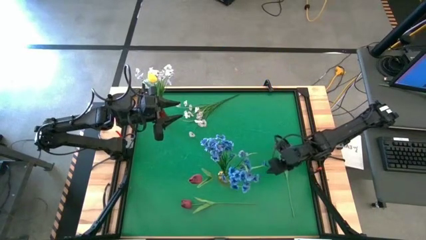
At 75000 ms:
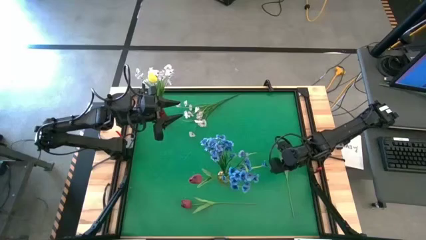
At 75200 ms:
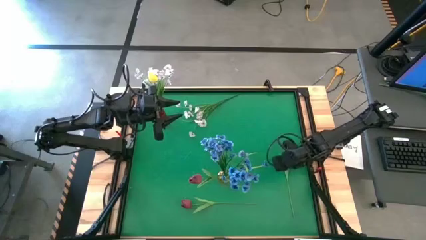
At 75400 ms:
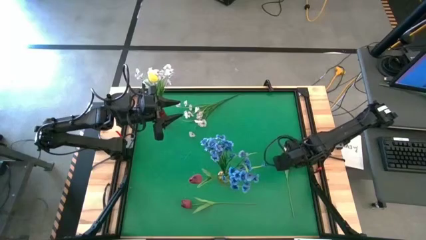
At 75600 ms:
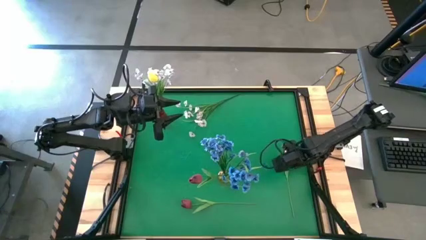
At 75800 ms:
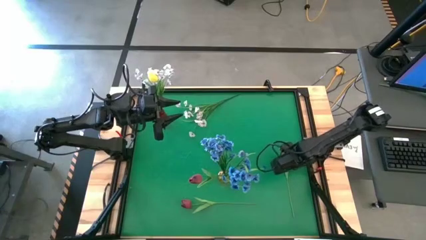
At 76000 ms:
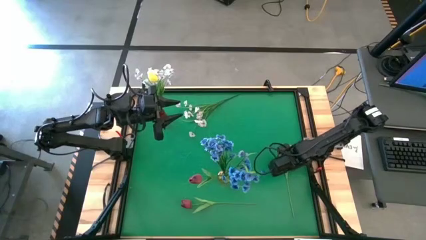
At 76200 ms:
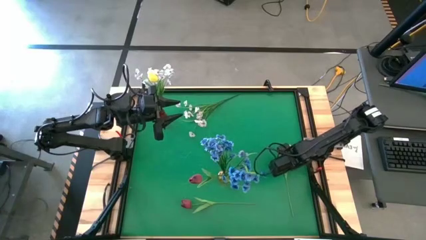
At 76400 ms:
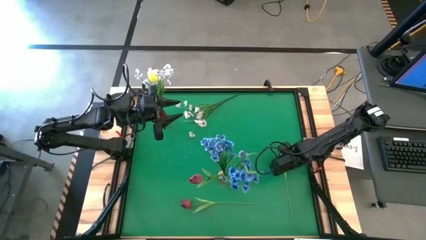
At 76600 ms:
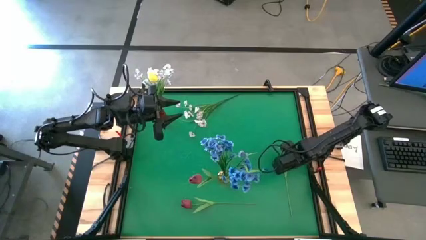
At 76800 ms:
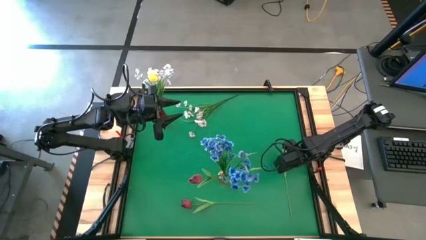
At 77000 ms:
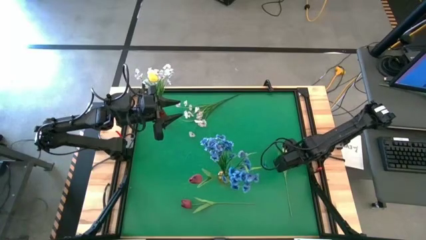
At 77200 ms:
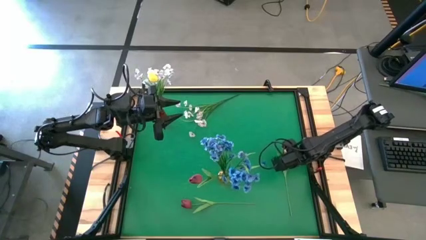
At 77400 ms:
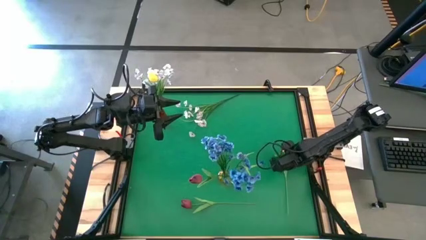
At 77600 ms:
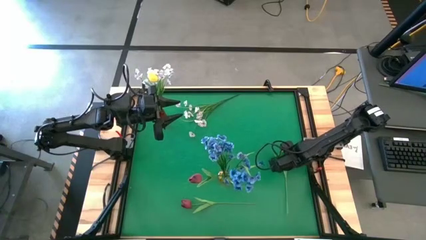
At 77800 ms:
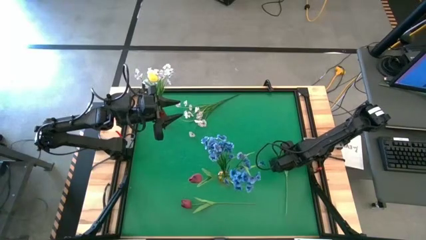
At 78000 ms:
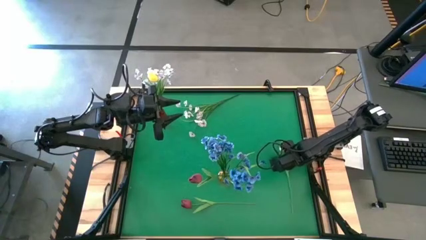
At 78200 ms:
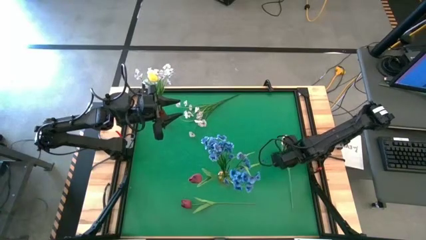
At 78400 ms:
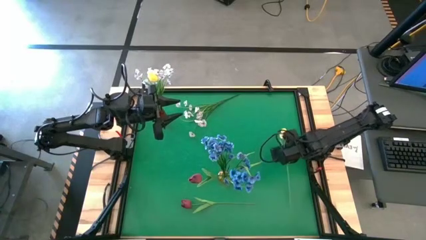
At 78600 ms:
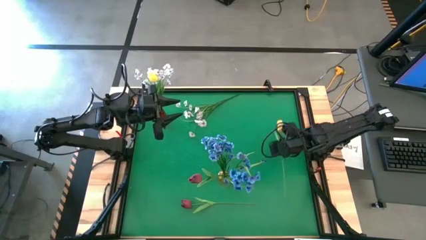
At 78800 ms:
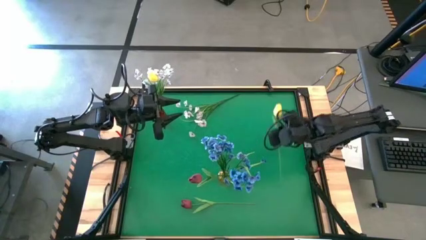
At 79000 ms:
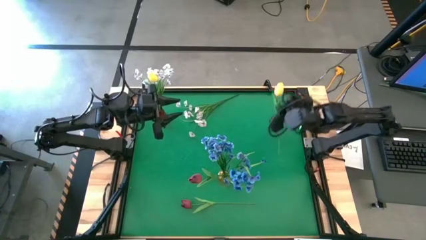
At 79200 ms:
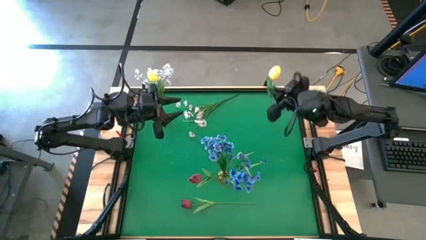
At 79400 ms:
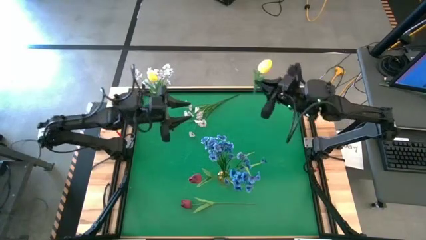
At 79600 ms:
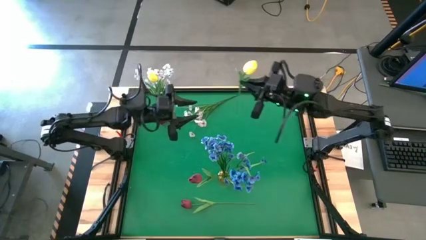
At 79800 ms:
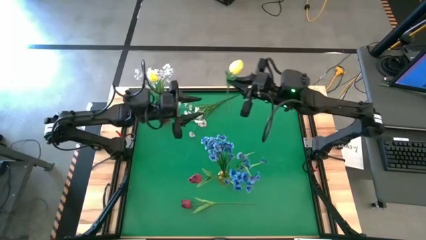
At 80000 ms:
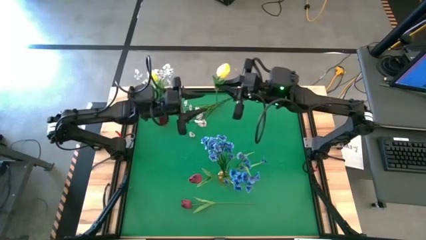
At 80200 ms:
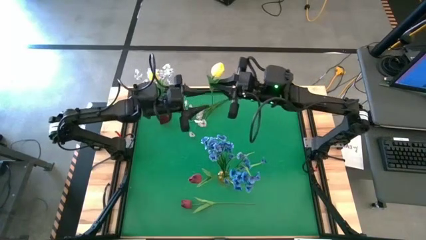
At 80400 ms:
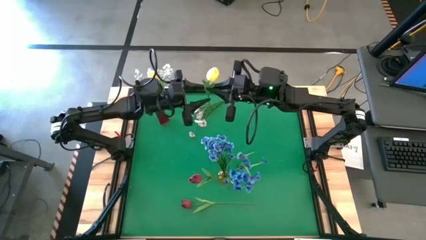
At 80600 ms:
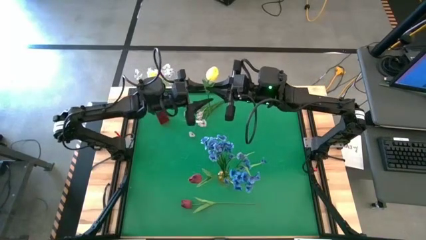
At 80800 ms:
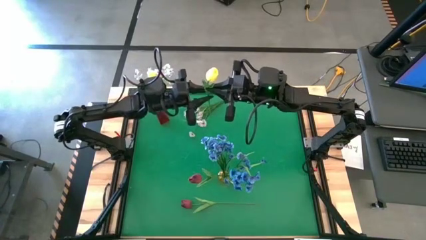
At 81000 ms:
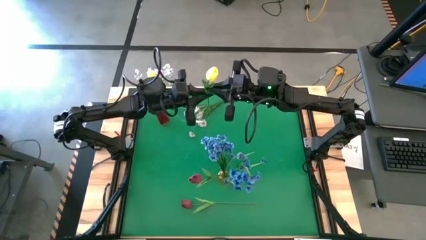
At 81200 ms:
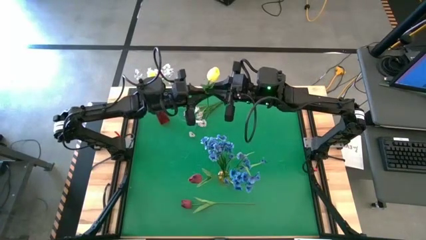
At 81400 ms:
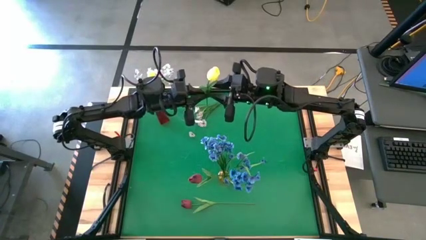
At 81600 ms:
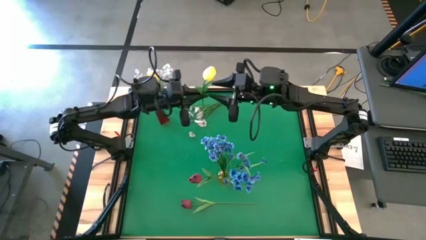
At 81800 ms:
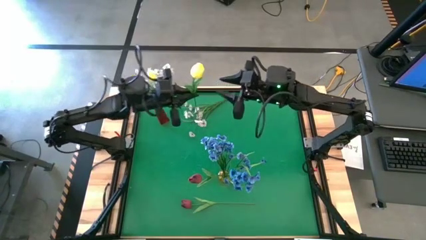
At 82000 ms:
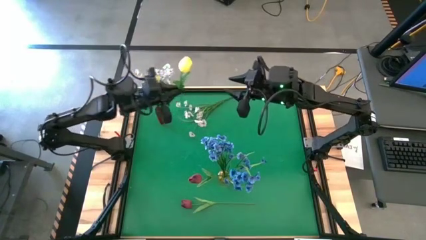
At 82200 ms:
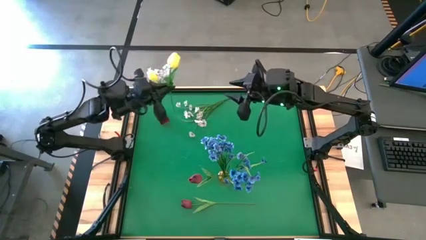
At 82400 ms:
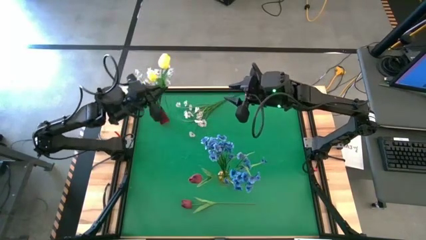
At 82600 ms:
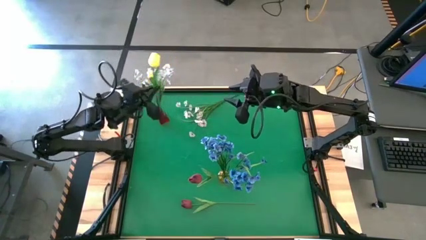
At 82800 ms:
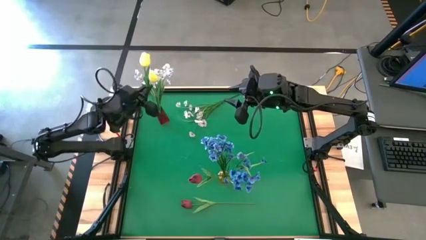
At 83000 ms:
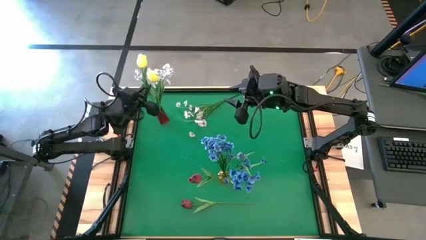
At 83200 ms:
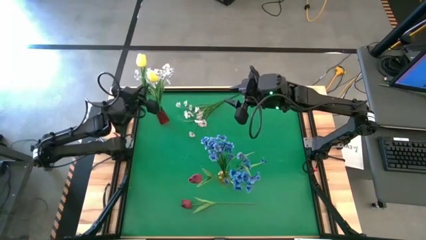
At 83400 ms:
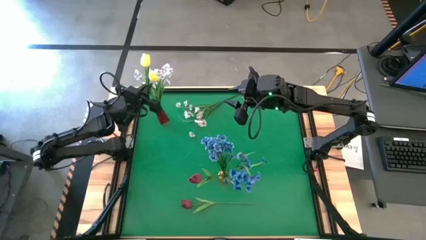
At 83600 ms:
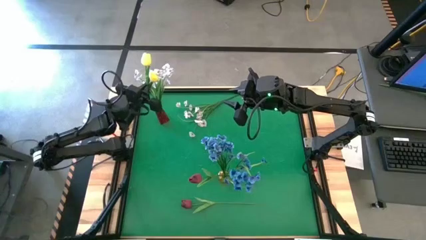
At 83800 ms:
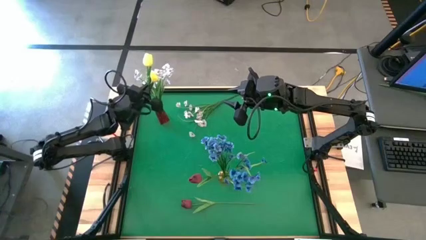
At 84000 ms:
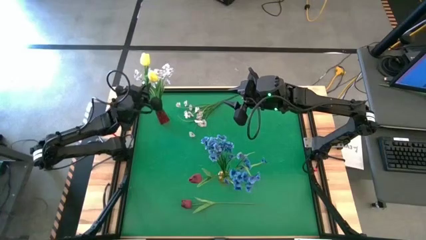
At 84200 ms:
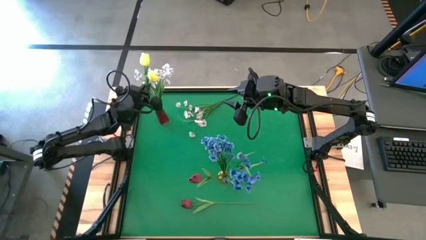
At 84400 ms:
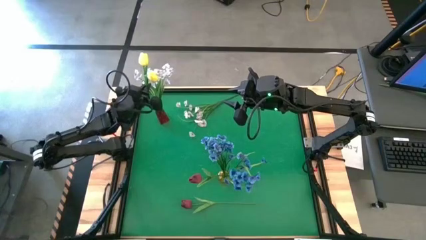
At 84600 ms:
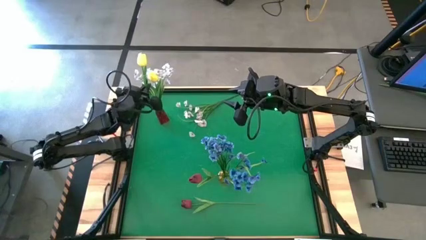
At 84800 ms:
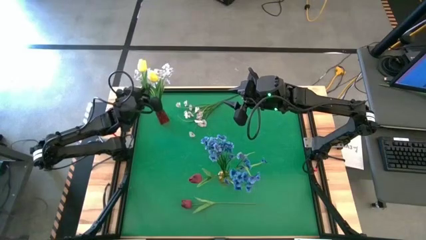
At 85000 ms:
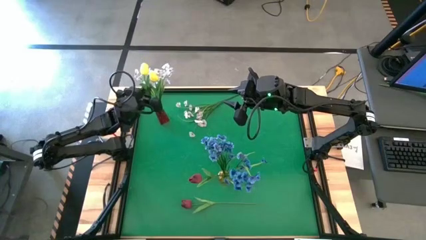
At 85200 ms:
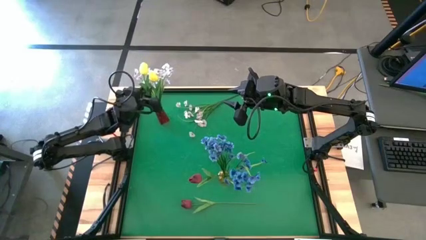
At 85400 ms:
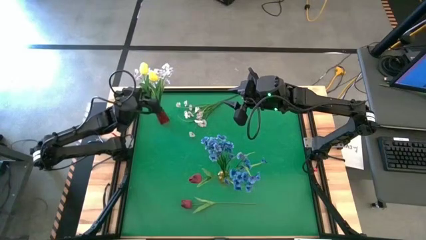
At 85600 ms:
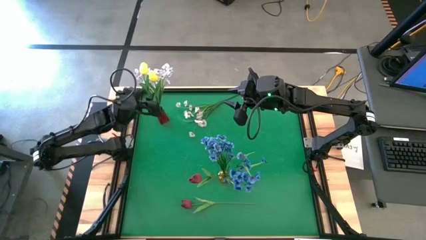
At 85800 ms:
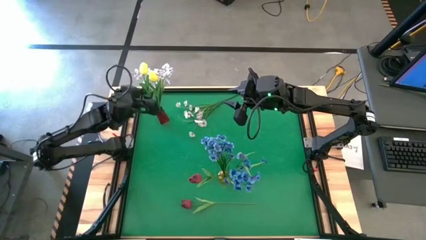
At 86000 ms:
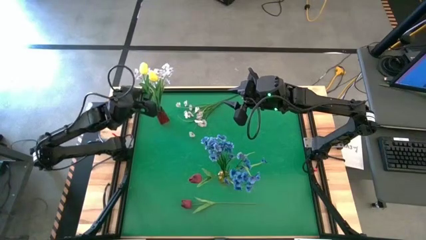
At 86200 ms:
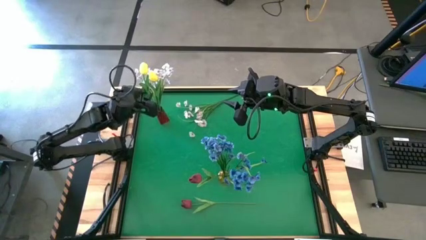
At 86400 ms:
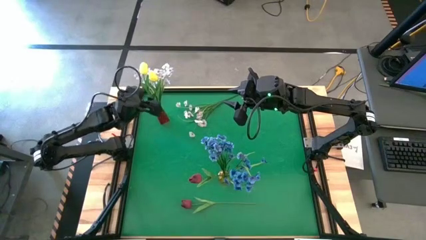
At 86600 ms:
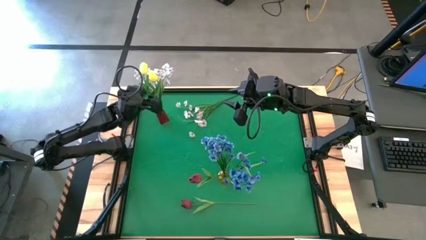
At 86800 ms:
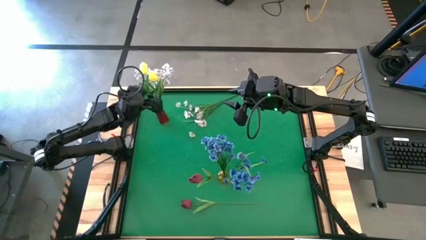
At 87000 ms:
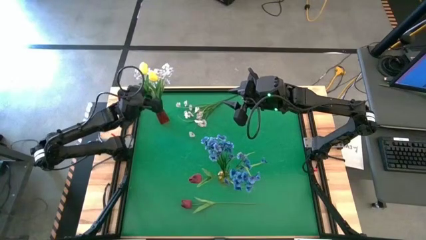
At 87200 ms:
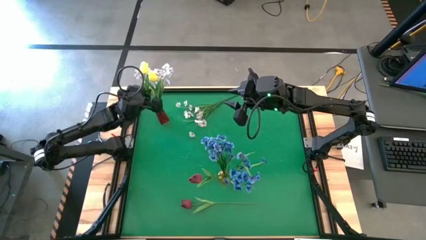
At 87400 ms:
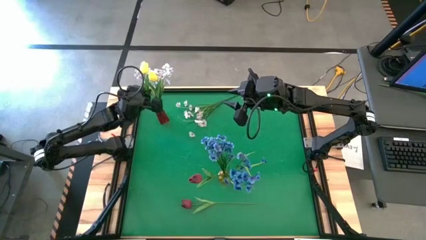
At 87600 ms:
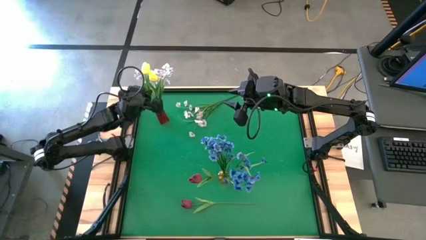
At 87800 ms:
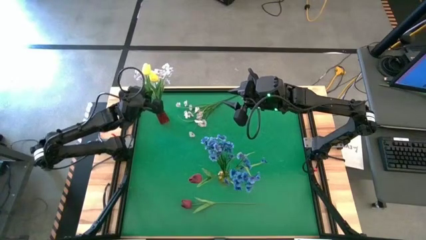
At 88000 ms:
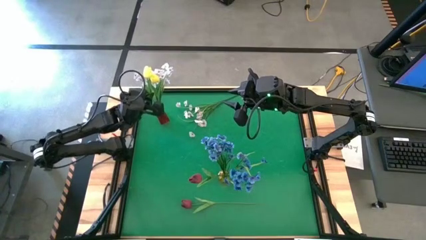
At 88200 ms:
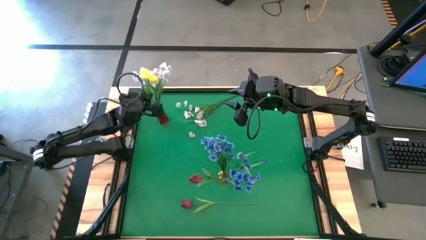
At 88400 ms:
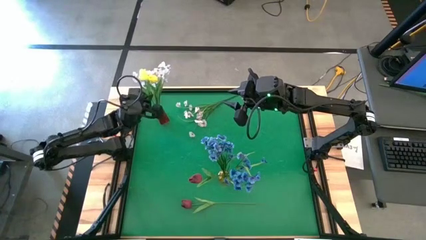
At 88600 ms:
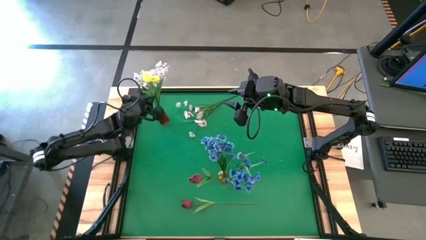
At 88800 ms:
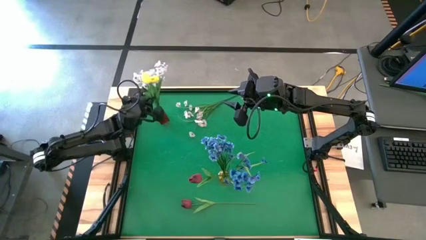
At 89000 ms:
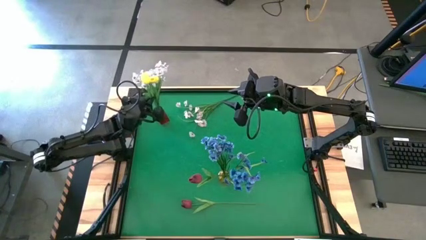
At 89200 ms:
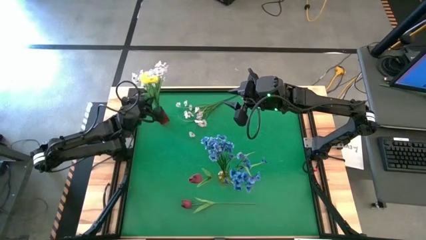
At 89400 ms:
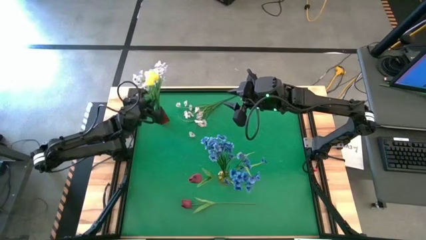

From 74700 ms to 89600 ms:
Task: Sort flowers into vase by color
Put the yellow flower into the red vase

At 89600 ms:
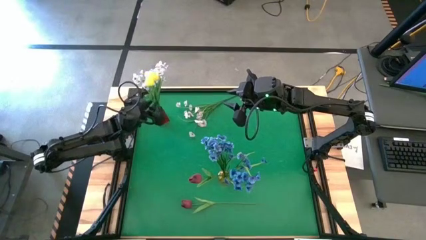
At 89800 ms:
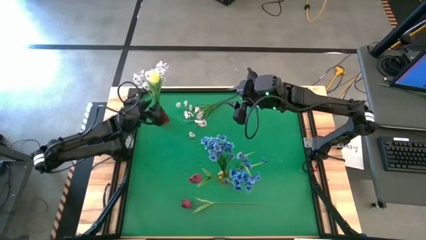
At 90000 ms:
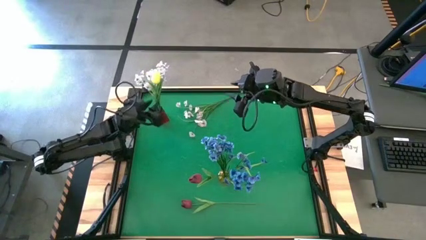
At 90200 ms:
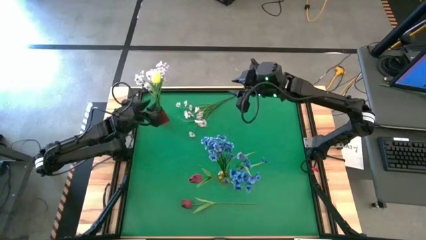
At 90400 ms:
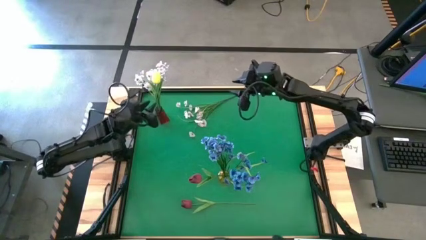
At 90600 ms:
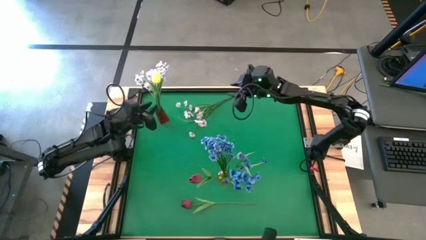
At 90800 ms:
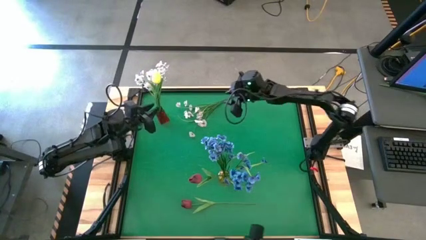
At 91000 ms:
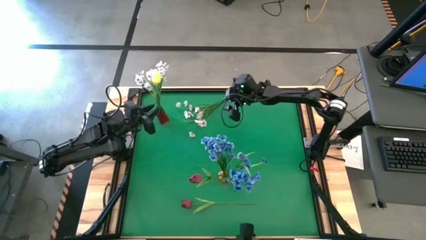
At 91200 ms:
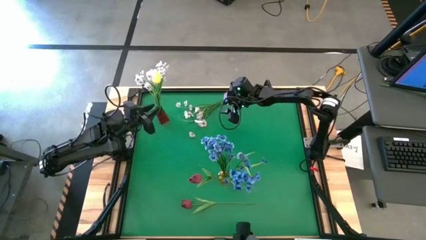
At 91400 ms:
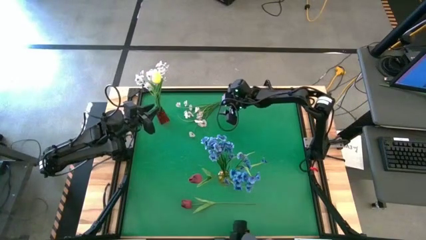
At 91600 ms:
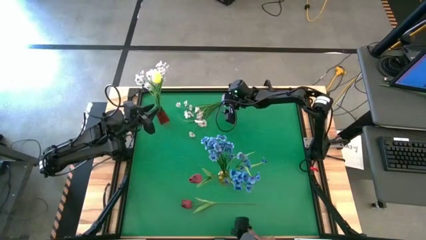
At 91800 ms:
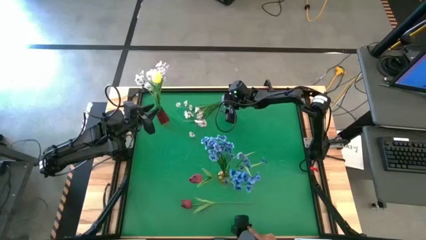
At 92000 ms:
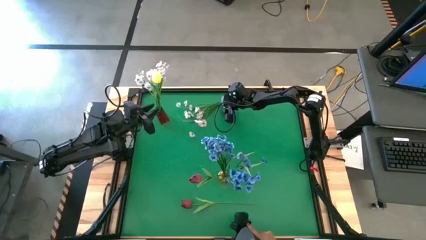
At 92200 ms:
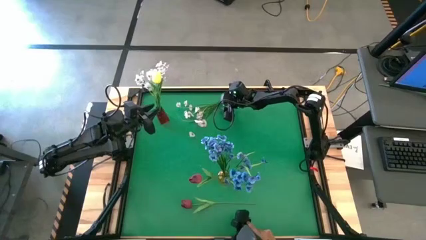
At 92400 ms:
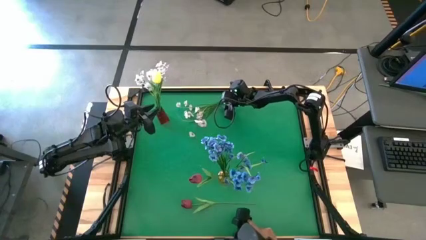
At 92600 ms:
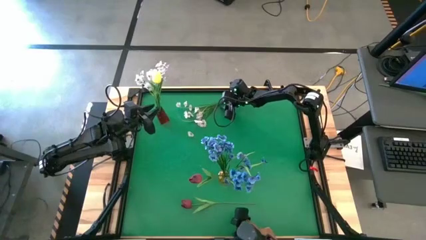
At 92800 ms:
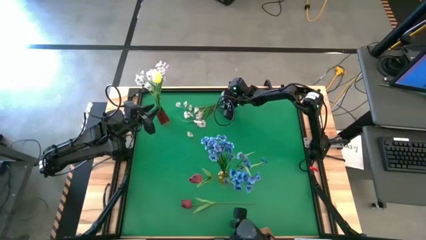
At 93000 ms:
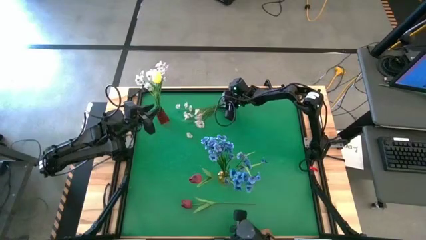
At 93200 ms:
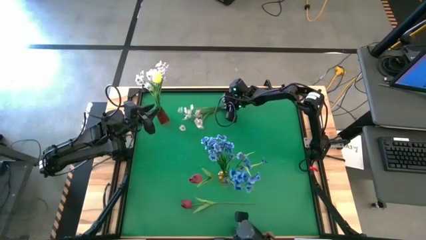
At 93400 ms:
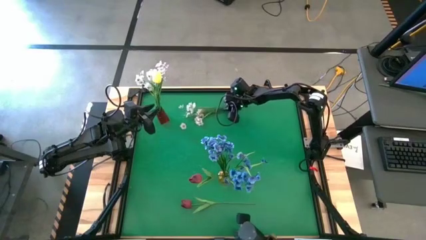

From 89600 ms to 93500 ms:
Put the white flowers into the red vase
